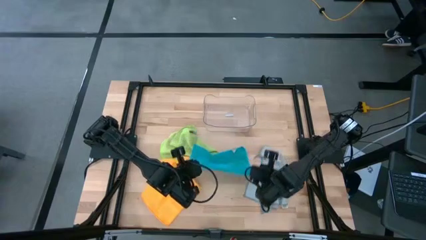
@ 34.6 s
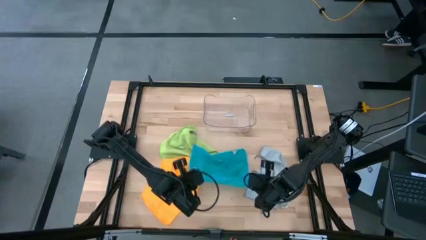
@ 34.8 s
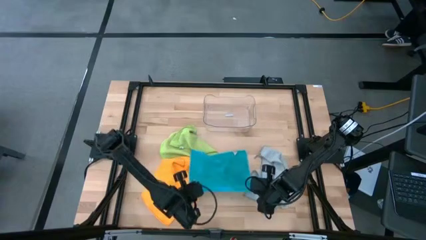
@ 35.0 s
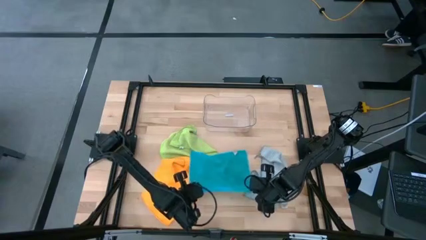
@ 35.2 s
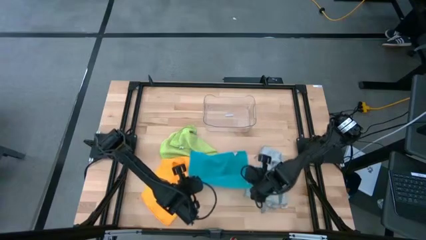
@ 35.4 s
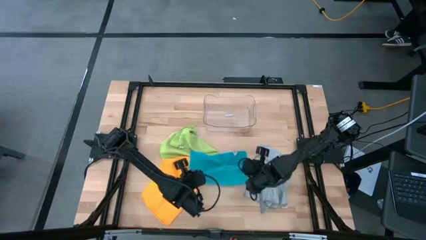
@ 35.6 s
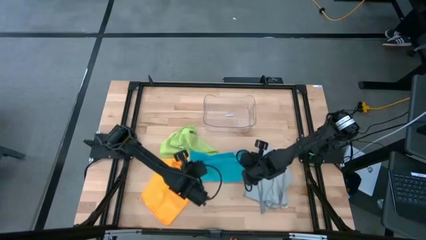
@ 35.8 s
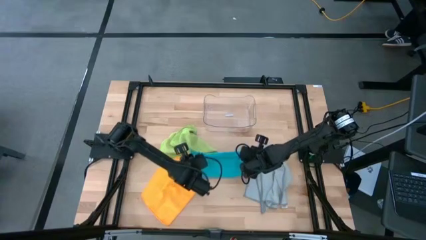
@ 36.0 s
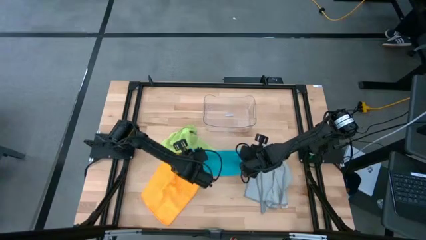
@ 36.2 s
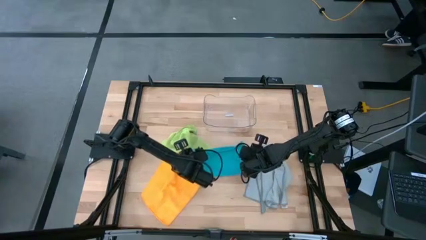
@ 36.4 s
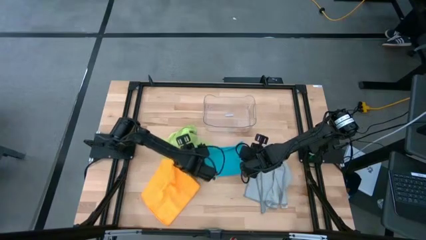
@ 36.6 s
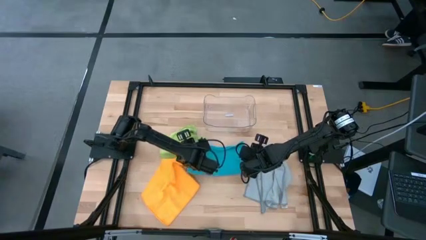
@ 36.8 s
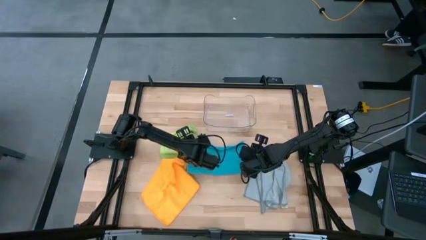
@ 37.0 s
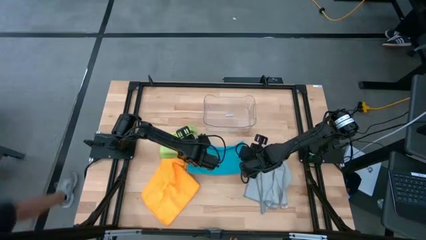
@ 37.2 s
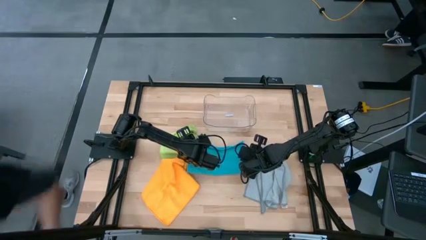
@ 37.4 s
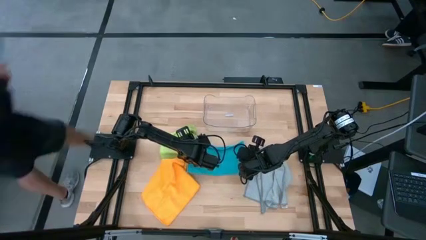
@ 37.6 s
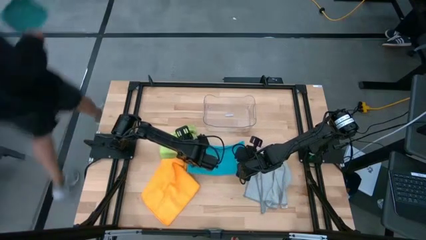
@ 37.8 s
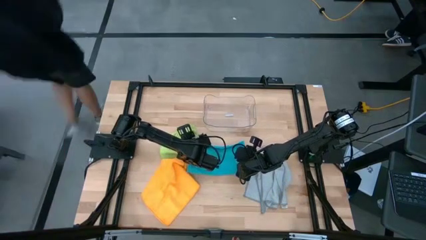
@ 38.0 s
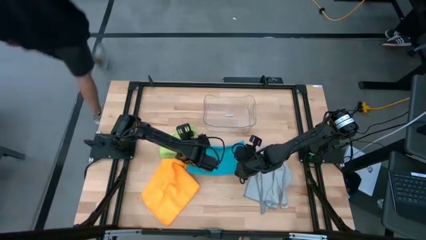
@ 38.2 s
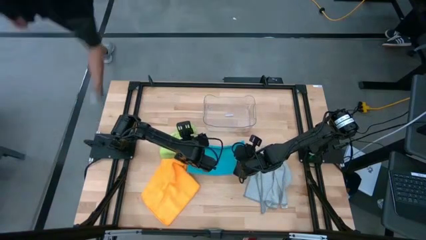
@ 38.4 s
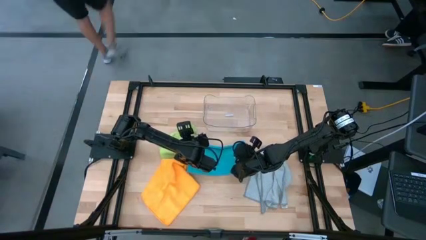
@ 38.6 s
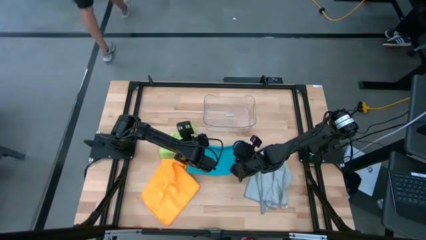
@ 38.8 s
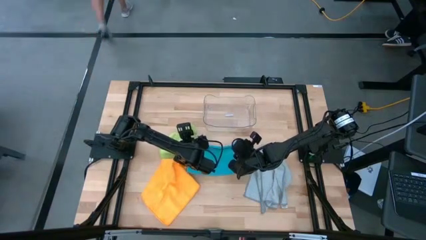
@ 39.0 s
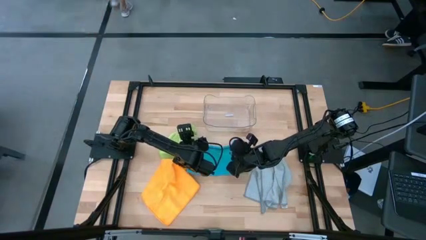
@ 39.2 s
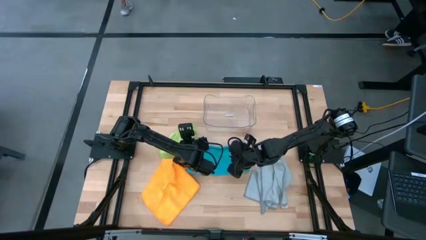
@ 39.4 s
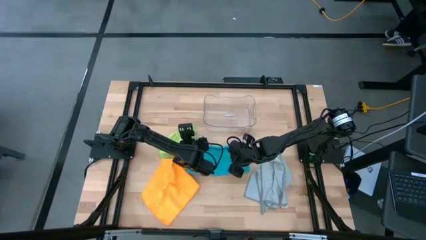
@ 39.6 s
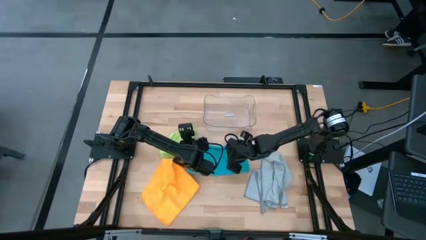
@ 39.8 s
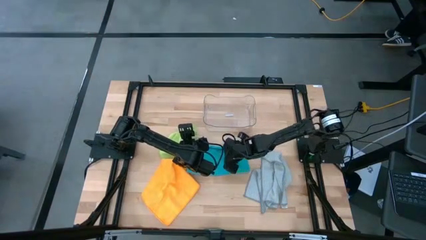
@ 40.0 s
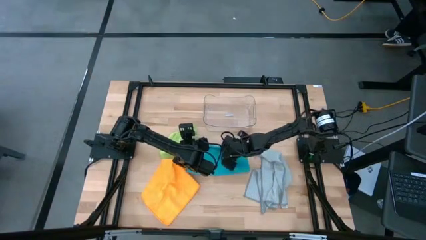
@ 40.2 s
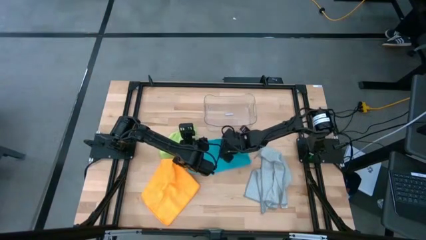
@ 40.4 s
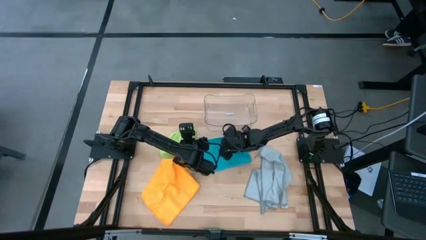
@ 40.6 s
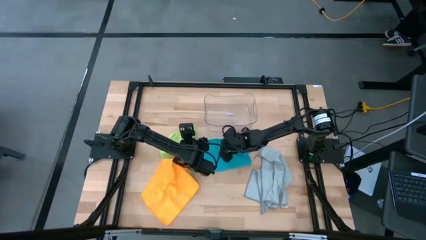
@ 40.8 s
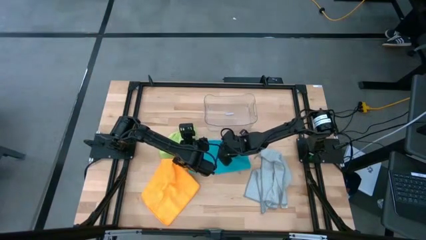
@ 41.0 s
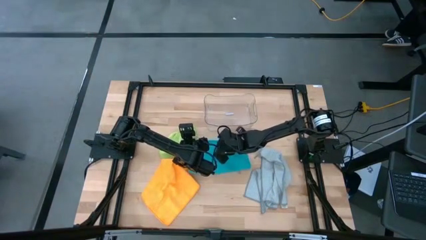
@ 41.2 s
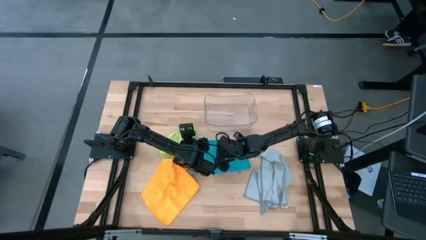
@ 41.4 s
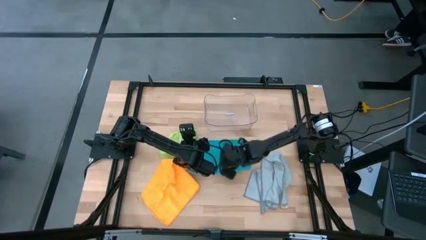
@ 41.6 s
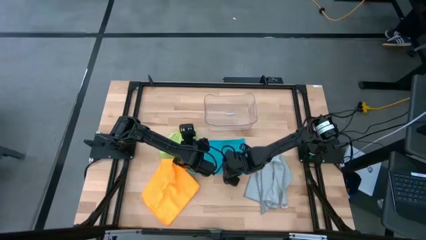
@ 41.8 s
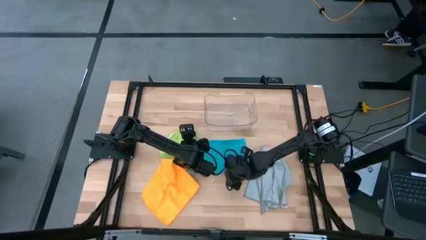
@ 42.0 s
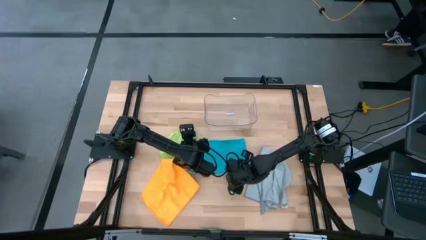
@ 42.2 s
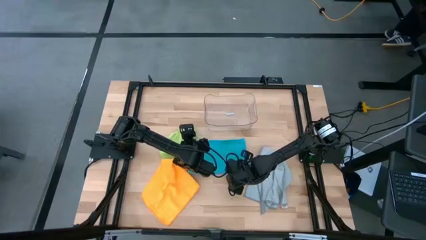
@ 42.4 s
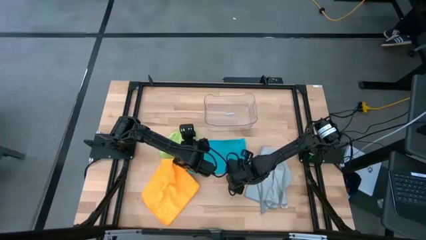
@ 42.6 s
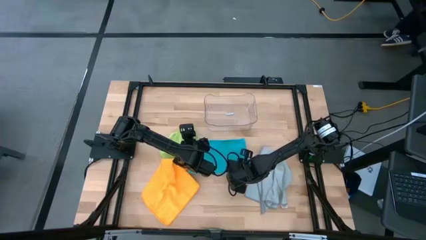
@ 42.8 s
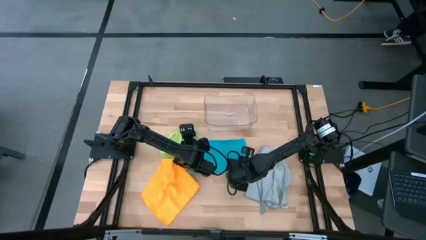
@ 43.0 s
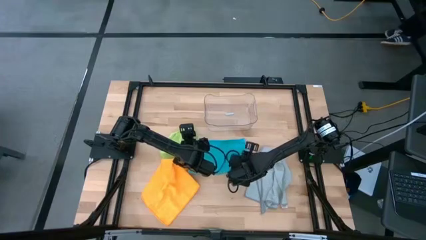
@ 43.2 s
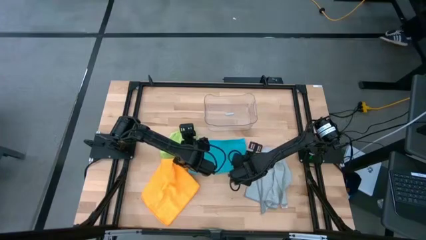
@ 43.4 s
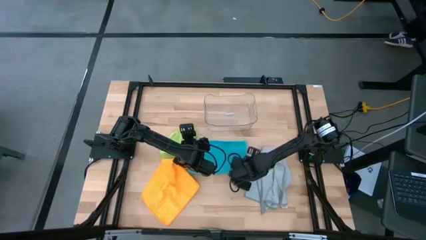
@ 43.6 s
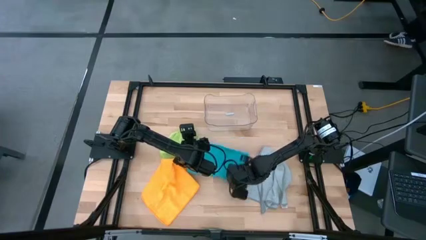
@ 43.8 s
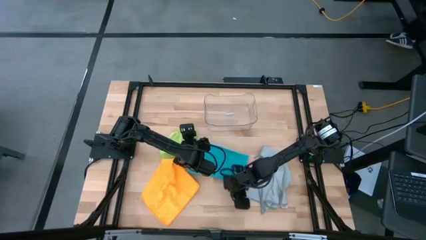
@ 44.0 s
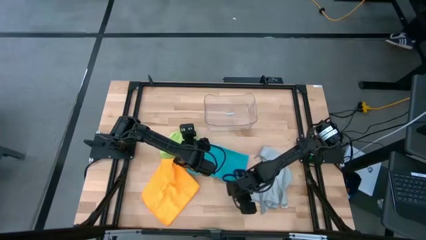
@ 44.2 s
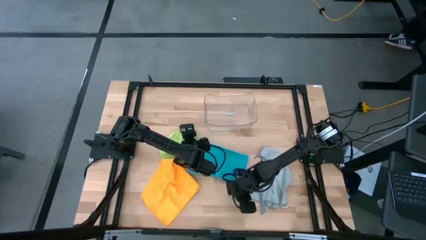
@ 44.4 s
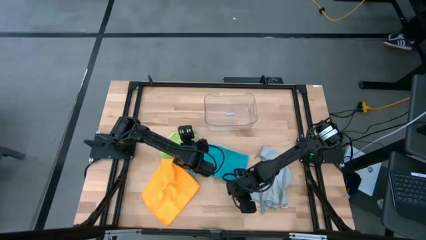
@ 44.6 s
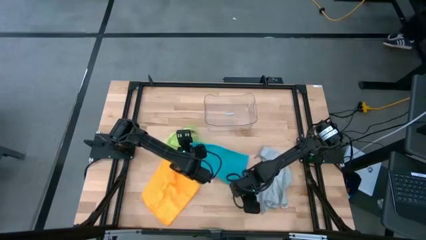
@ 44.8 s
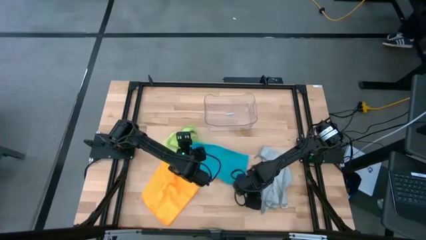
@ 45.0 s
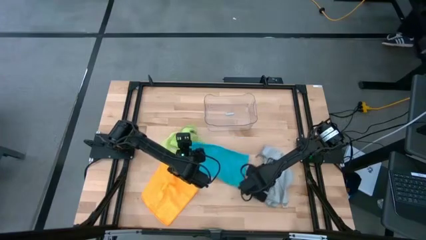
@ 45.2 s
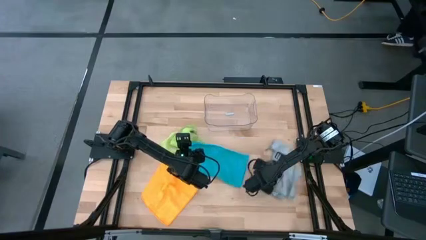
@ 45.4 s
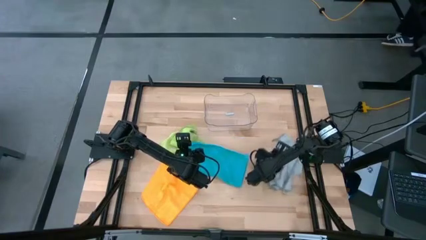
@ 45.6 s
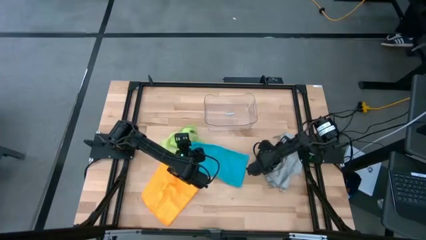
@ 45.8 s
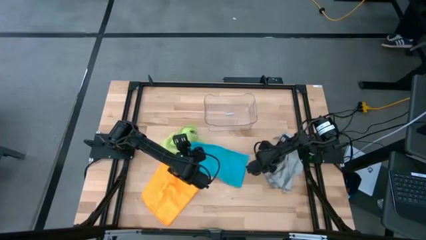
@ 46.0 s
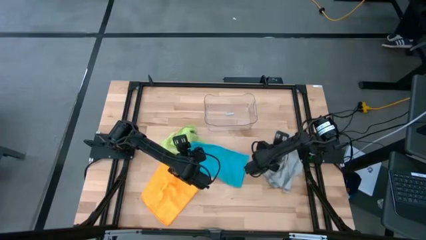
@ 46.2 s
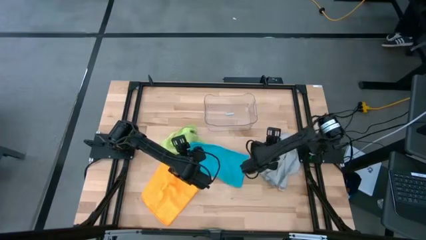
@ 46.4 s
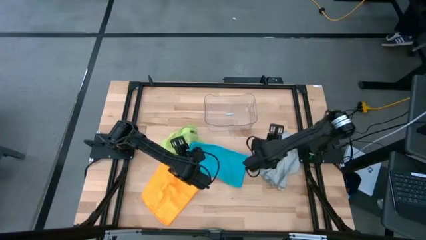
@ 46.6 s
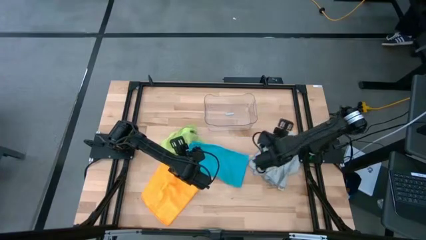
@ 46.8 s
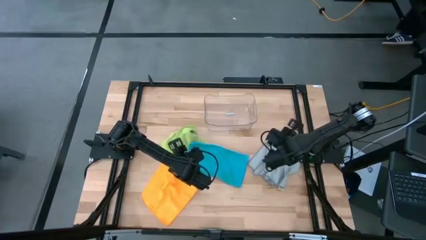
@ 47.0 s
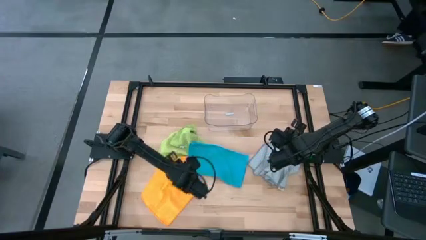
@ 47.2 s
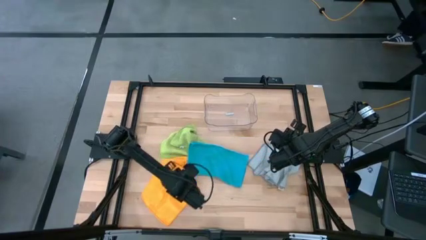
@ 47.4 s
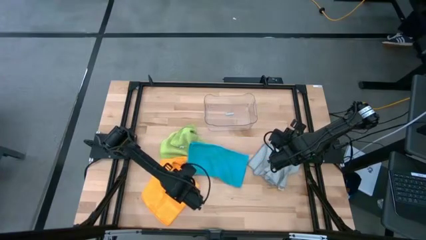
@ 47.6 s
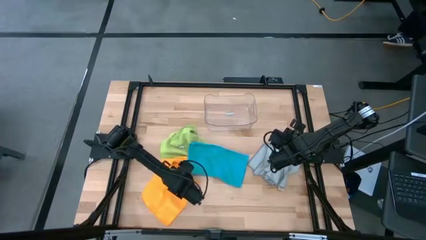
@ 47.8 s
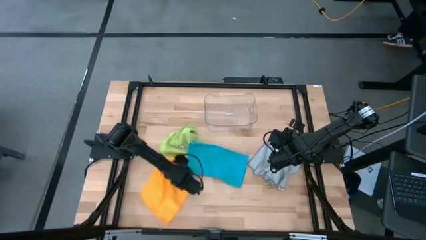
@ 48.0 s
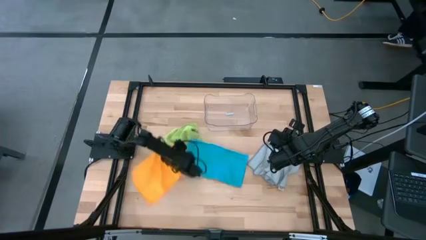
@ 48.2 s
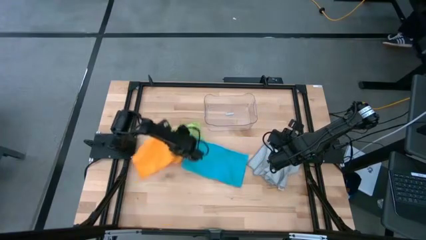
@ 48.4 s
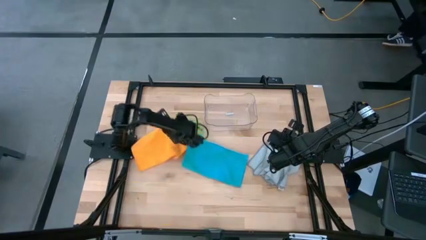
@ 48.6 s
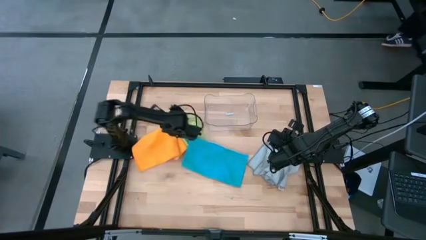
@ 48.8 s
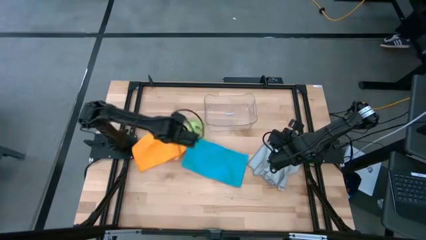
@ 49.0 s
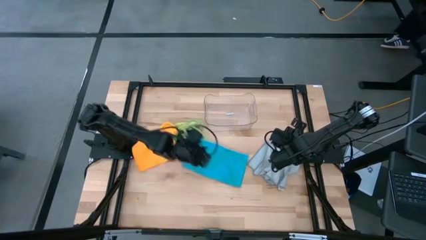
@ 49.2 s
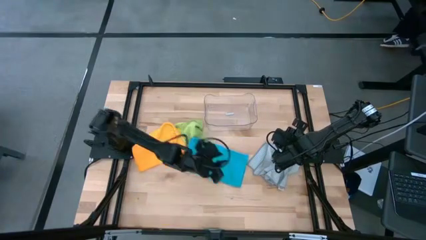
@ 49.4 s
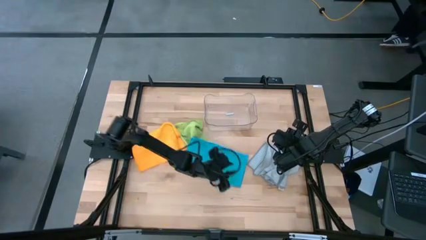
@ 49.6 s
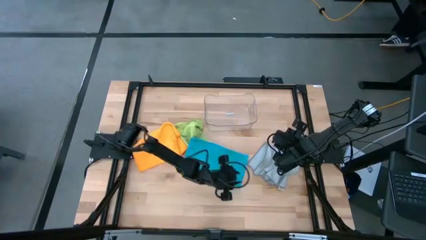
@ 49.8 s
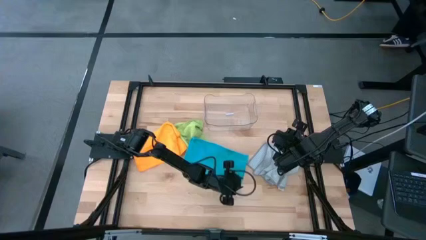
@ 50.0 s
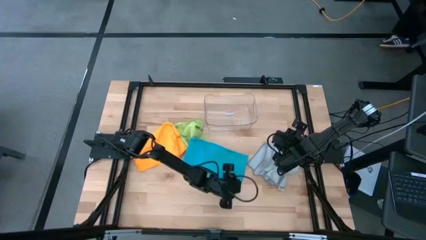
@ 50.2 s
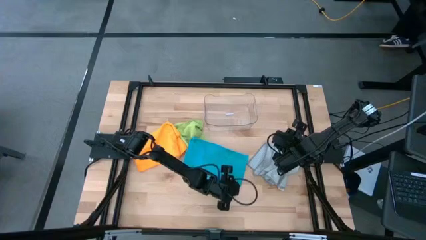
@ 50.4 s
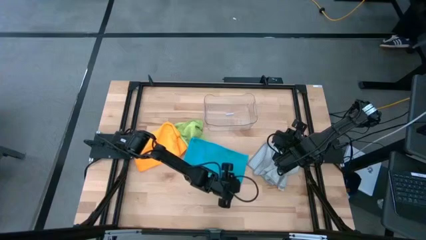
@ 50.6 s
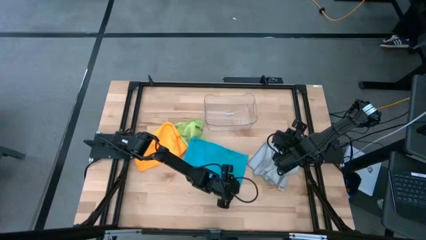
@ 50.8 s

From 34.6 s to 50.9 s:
Task: Fold microfiber towels
Fold the blue towel
